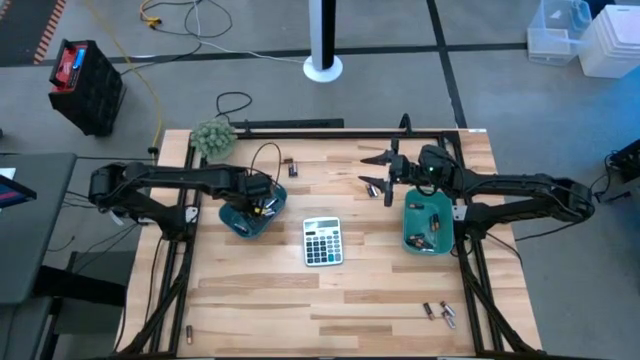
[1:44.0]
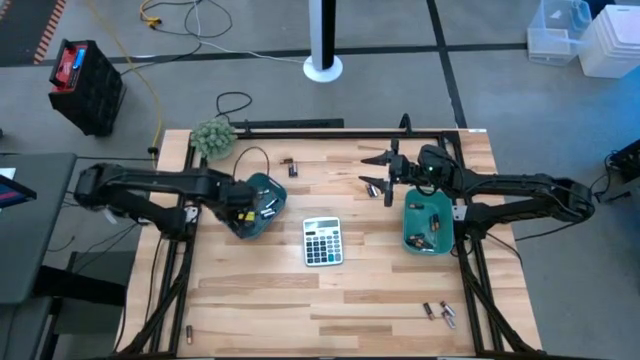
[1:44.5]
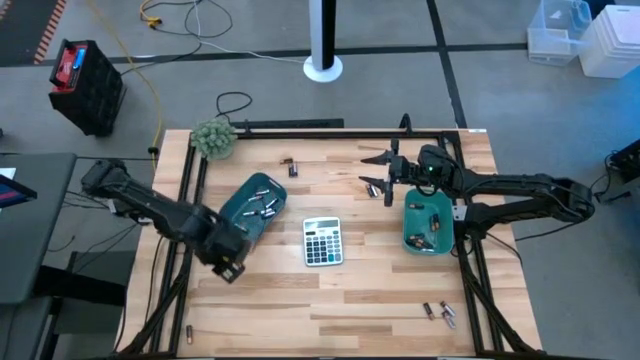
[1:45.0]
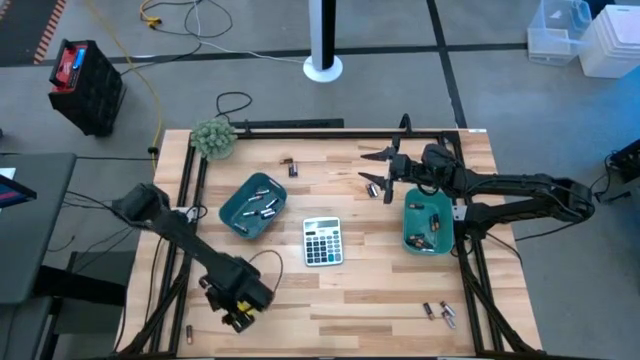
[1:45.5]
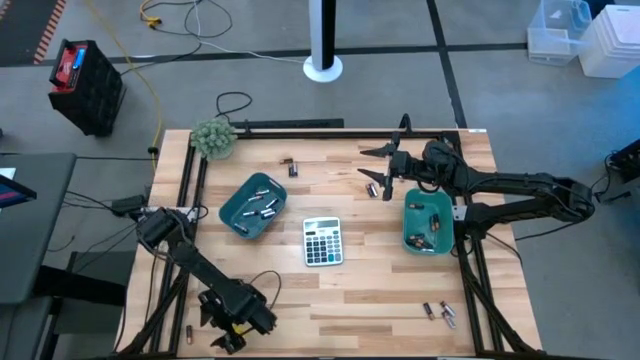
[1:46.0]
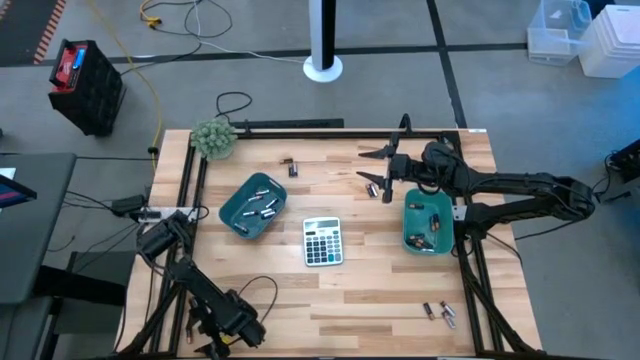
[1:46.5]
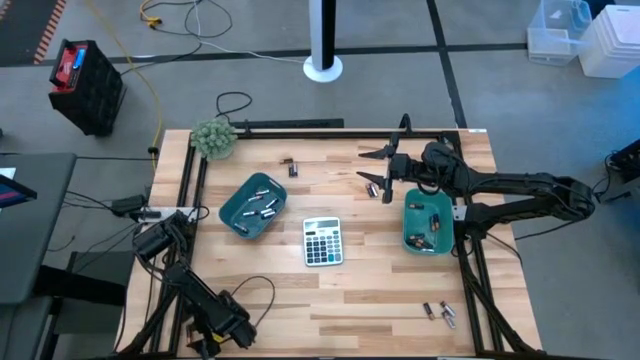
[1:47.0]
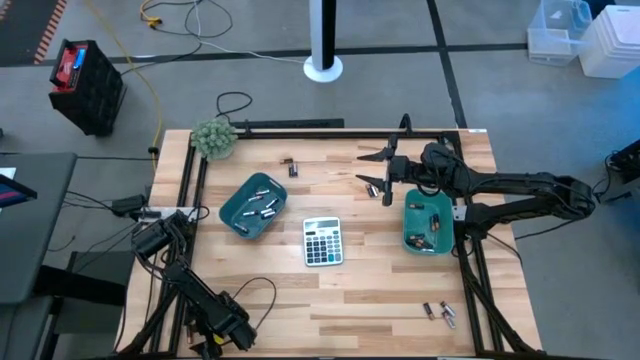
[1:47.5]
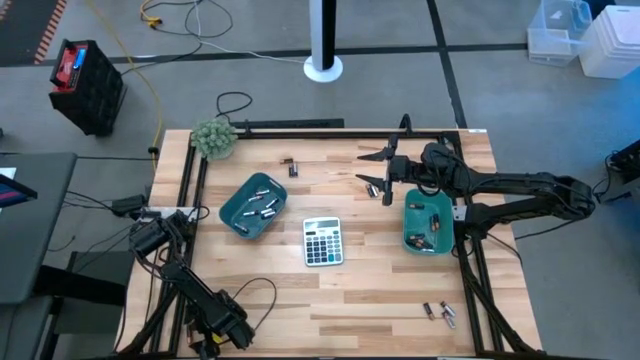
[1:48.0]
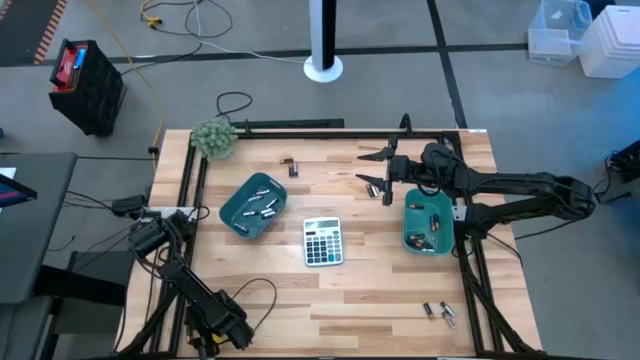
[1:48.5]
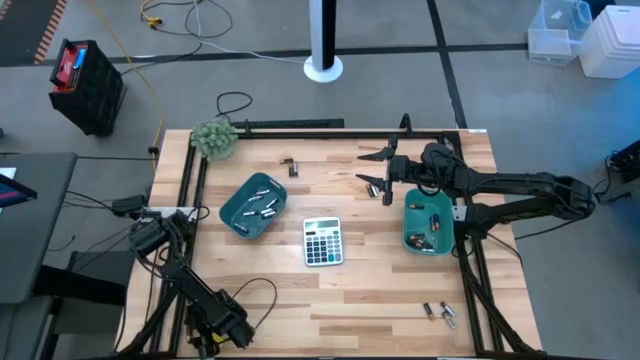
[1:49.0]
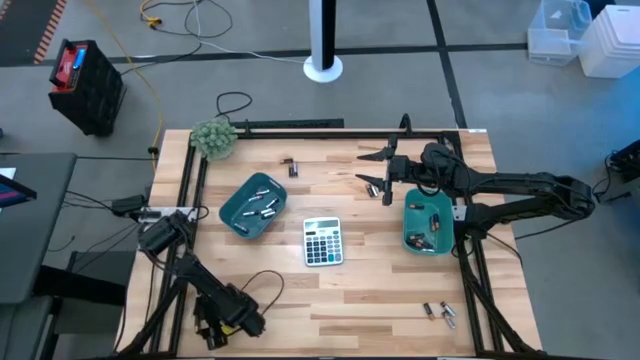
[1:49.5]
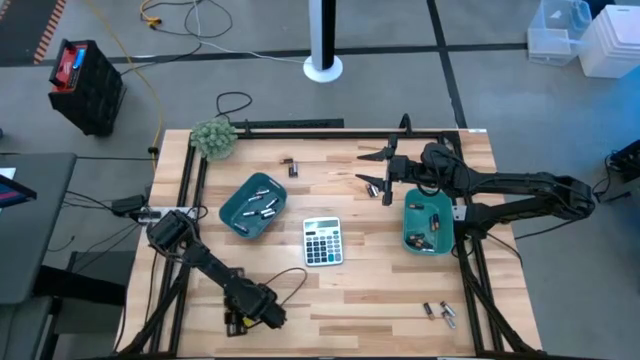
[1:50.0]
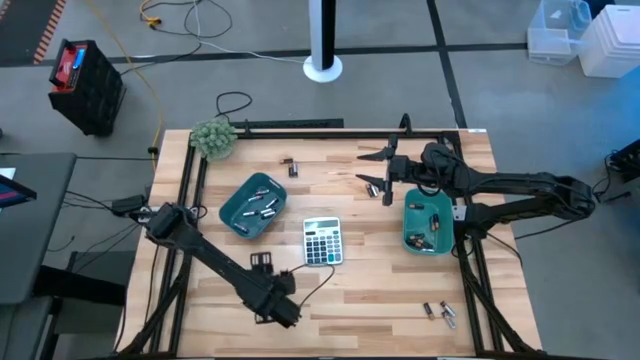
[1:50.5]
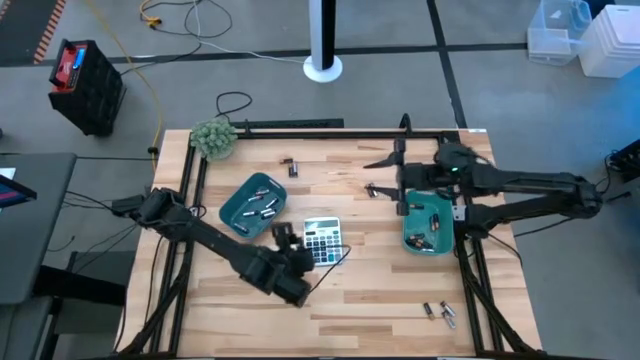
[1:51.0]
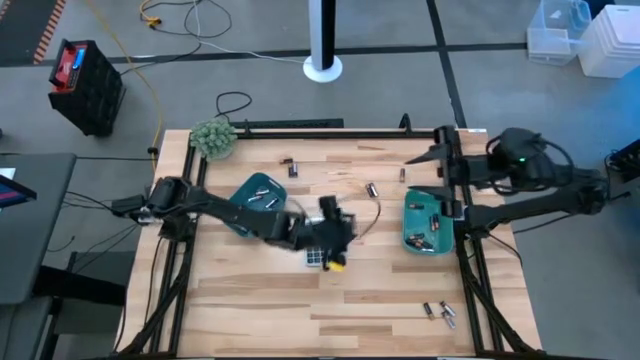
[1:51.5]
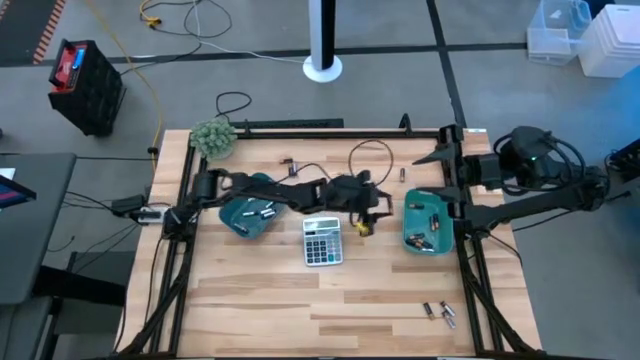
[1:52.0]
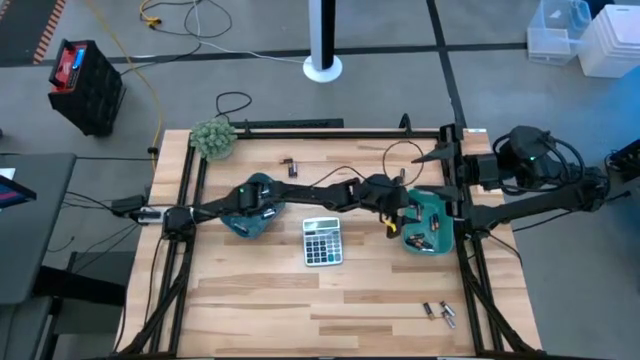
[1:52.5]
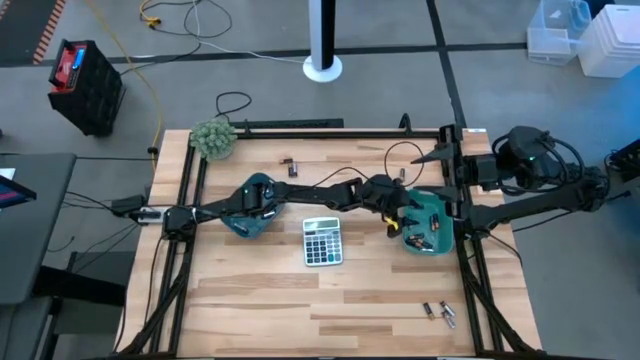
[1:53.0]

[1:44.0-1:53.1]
Task: Sort batteries
Put the brown/black battery into the green bin

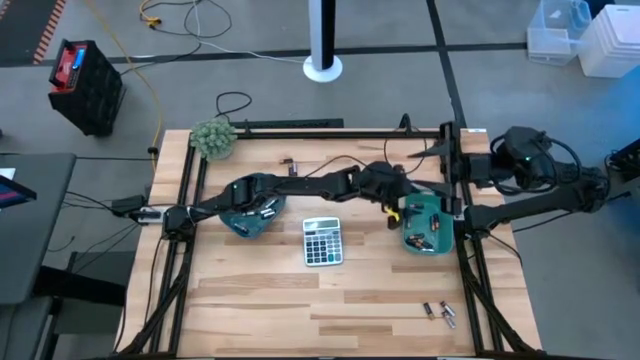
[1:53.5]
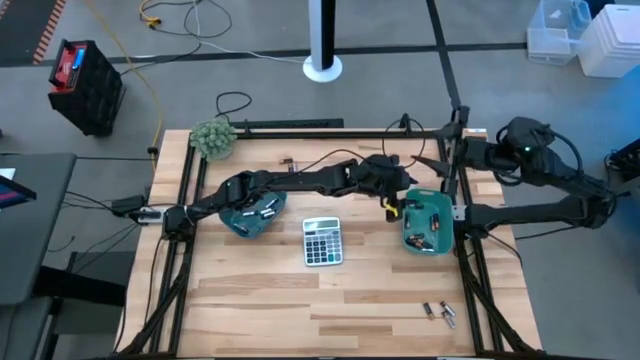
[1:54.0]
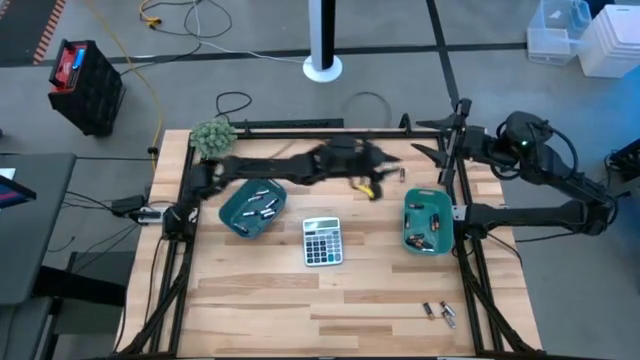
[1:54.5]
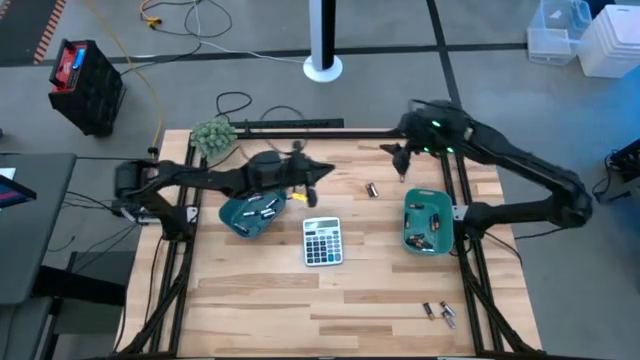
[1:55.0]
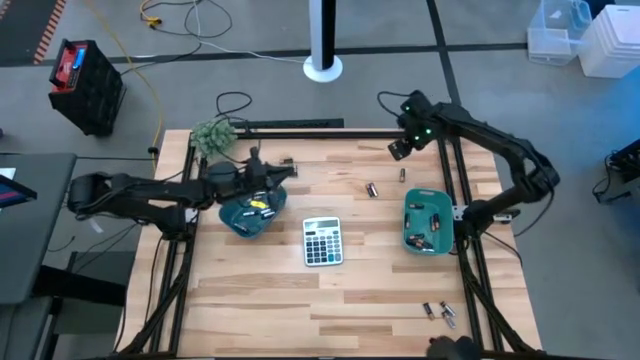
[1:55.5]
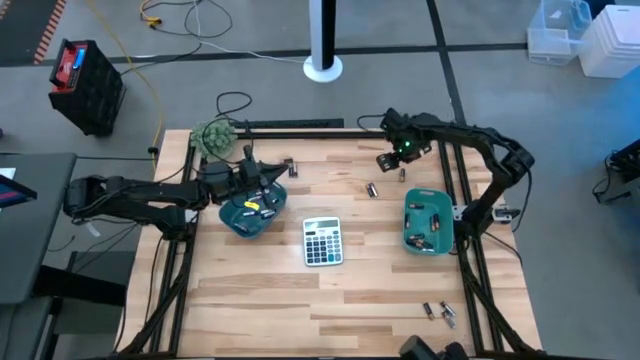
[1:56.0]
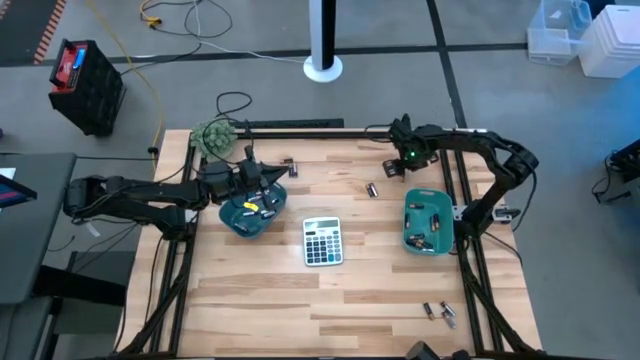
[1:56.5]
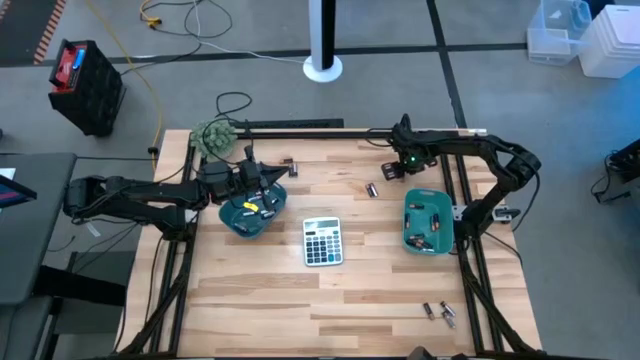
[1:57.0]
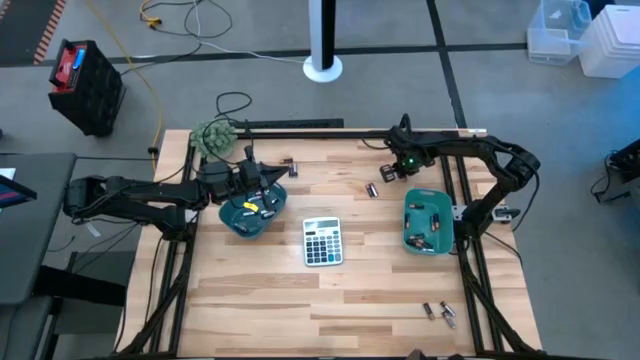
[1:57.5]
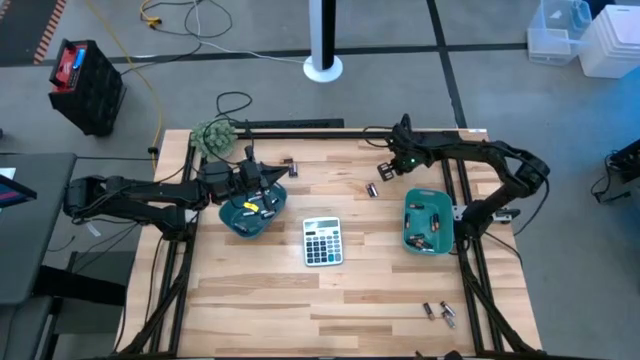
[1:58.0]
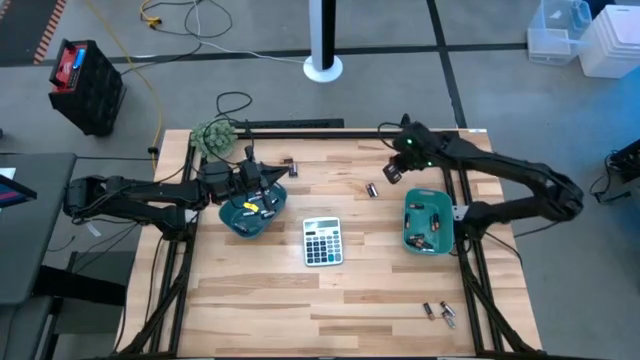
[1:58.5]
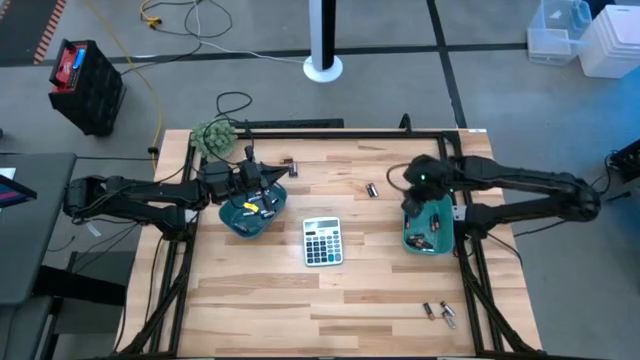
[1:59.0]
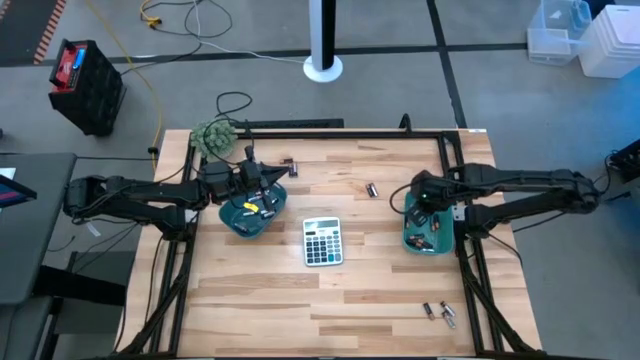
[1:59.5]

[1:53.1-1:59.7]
Put the brown/black battery into the green bin

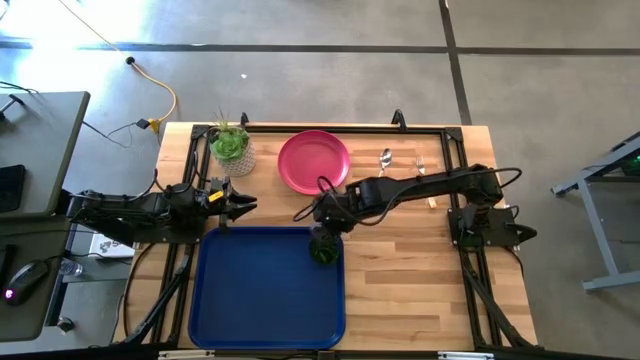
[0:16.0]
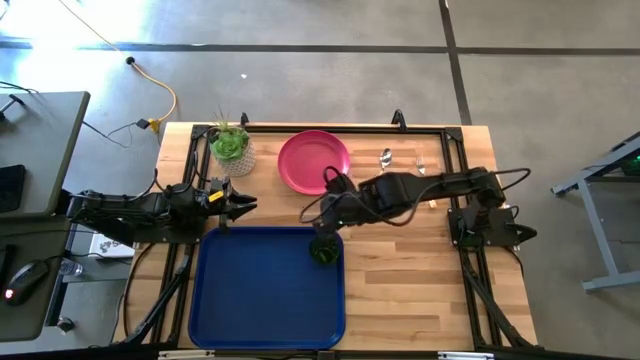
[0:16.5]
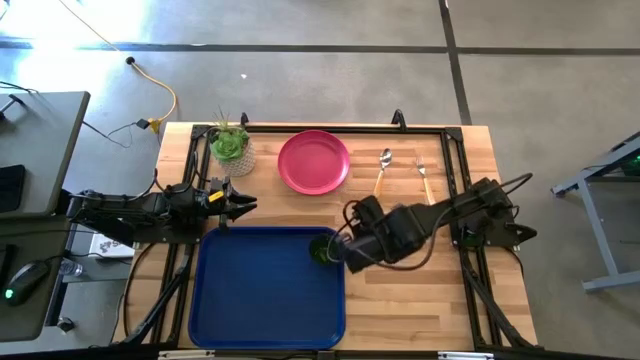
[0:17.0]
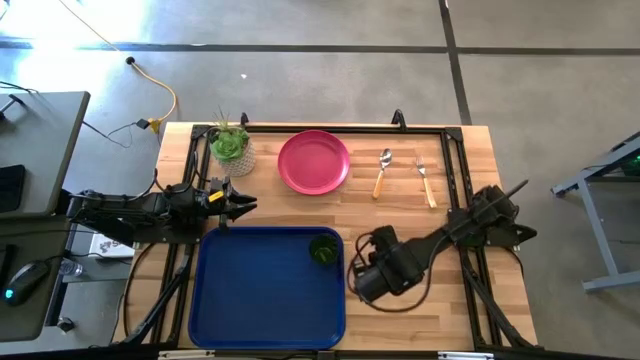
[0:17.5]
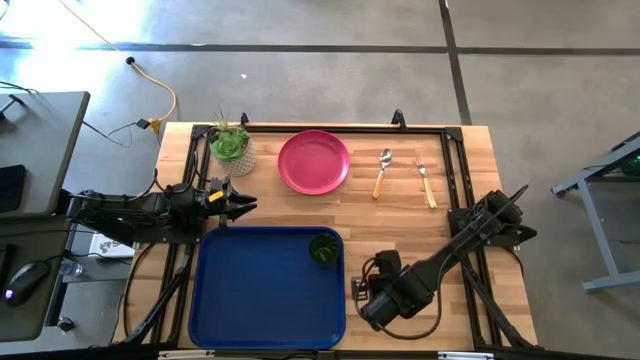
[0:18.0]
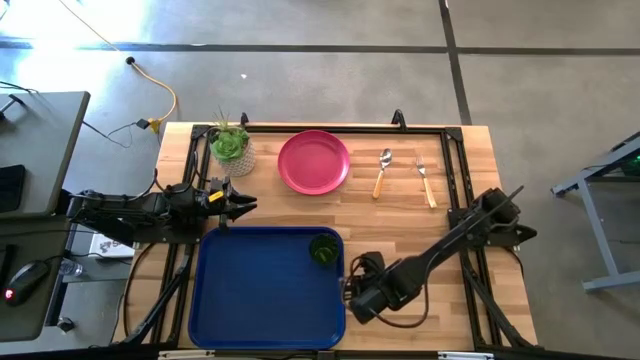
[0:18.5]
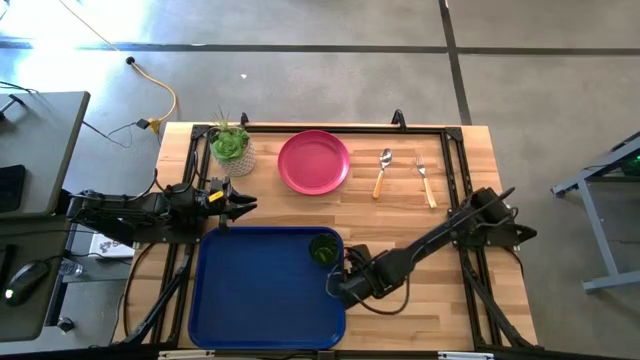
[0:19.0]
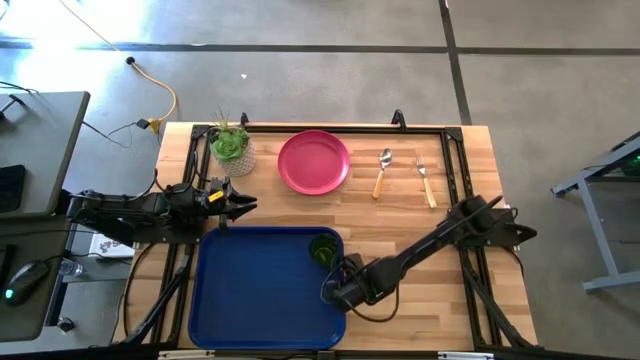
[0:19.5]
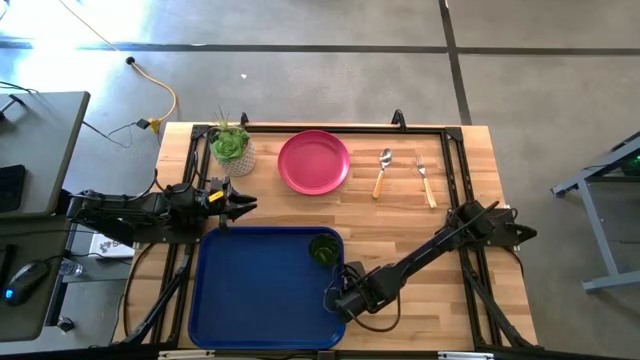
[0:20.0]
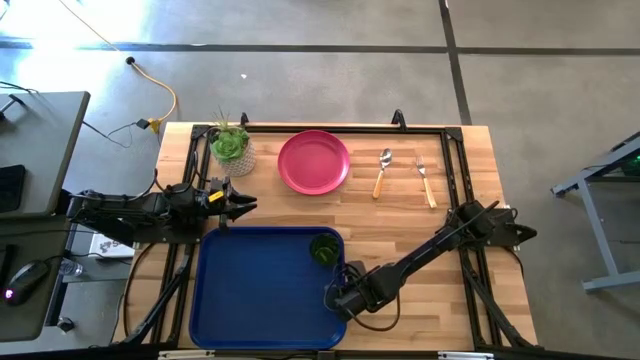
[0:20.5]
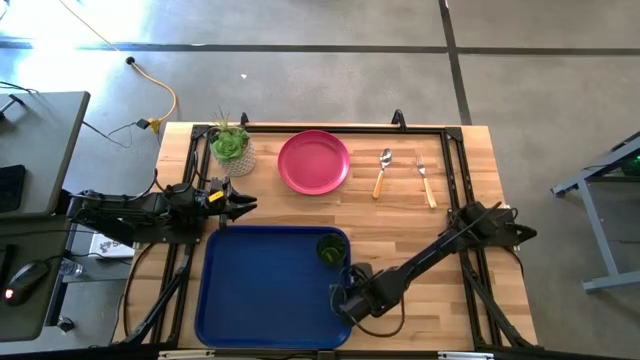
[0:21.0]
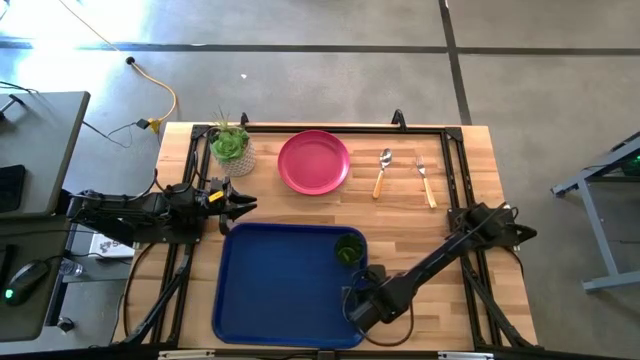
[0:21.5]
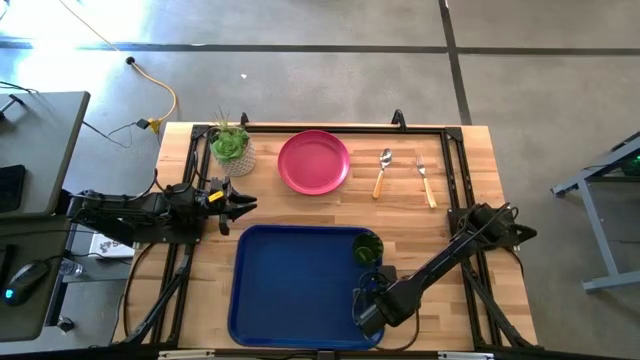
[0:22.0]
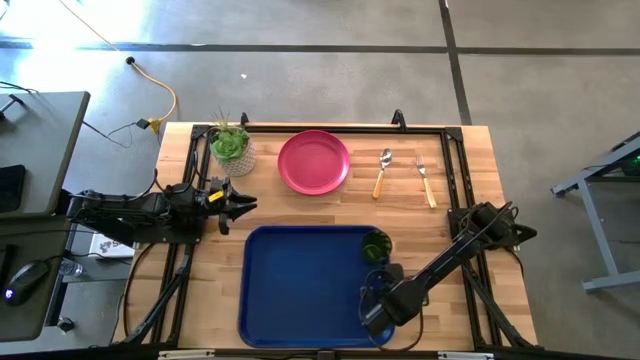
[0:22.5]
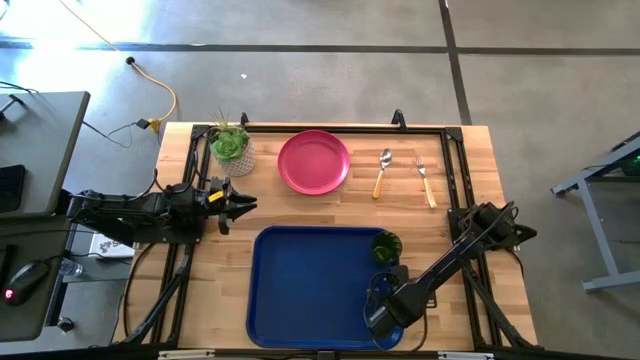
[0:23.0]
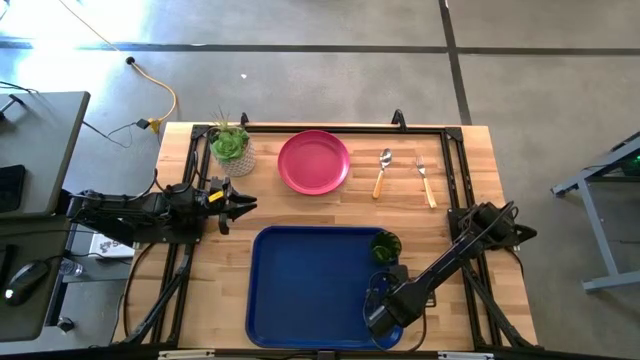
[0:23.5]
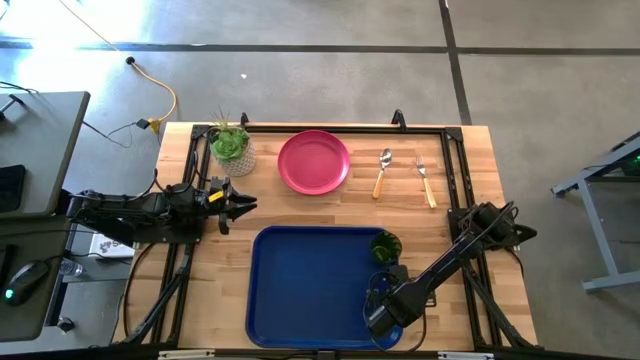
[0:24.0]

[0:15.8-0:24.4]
Task: Pick and place plate/cup/fork/spoon on tray
Move the blue tray to the center of the table
